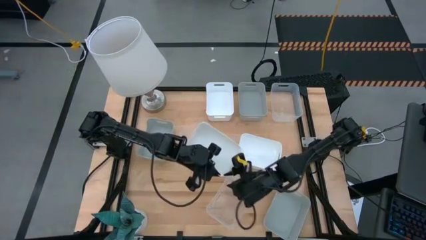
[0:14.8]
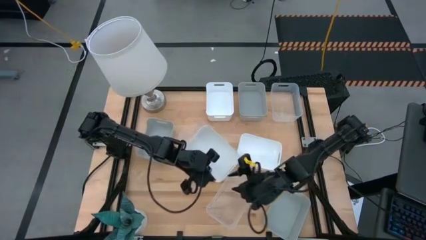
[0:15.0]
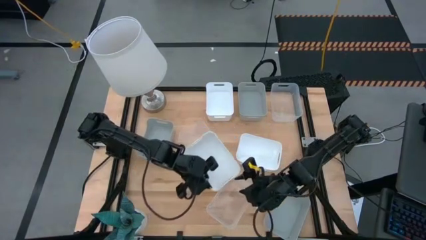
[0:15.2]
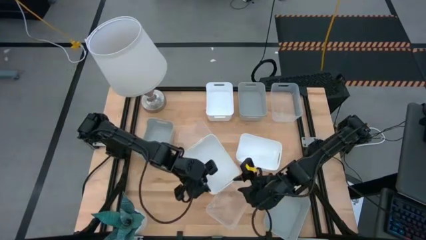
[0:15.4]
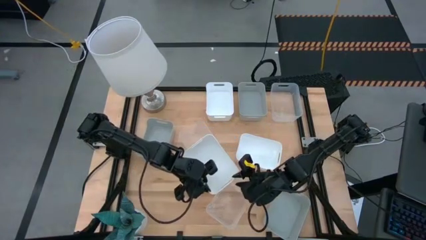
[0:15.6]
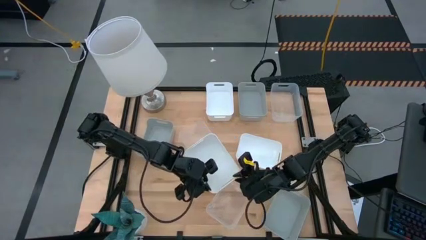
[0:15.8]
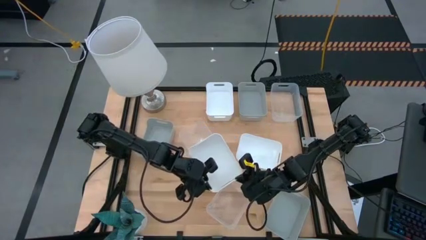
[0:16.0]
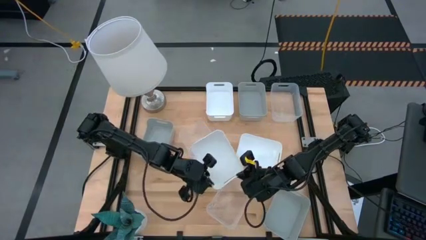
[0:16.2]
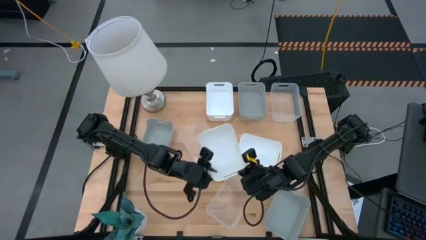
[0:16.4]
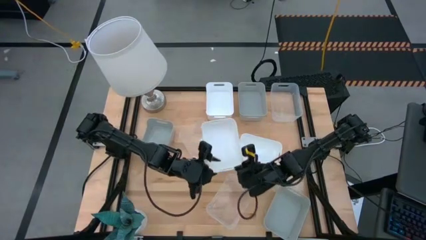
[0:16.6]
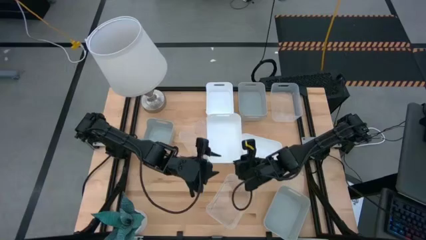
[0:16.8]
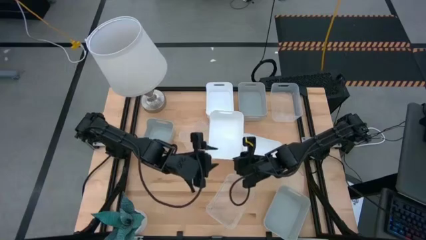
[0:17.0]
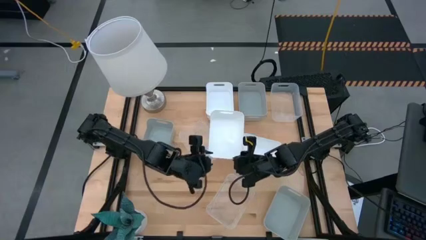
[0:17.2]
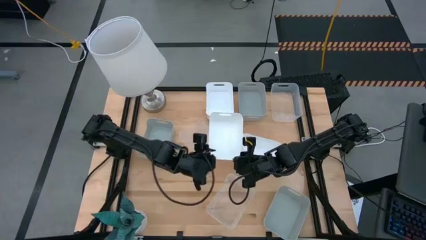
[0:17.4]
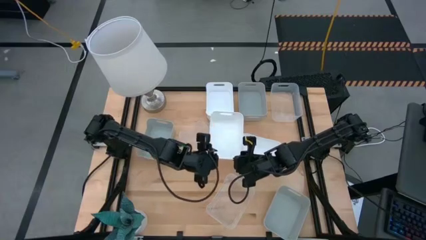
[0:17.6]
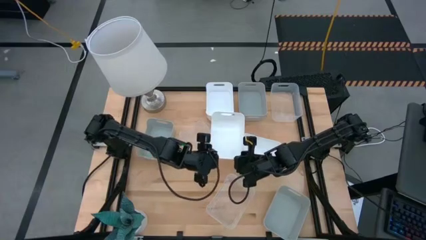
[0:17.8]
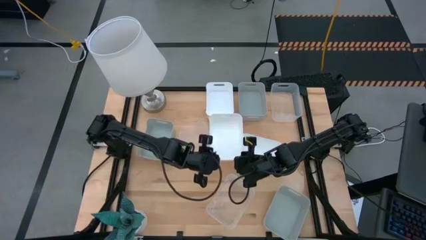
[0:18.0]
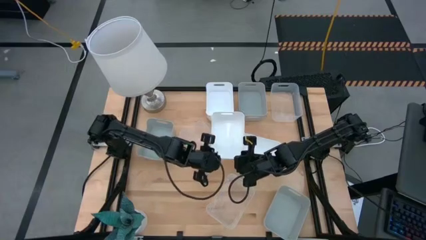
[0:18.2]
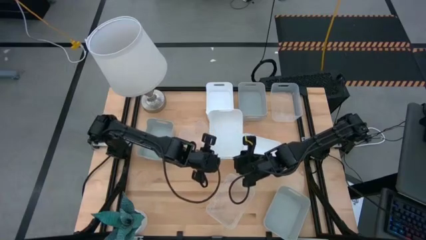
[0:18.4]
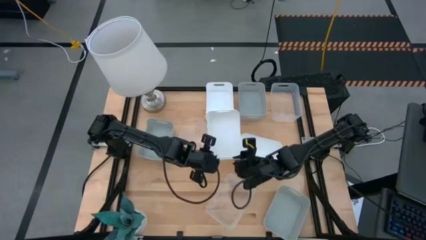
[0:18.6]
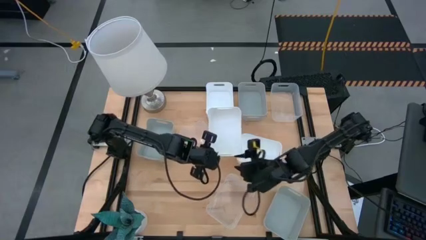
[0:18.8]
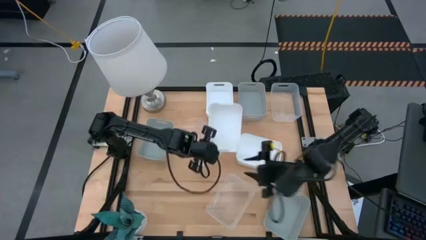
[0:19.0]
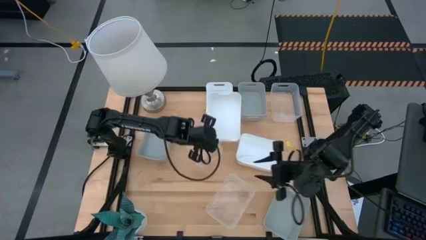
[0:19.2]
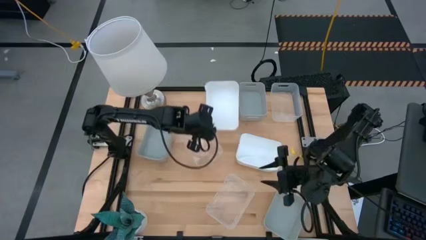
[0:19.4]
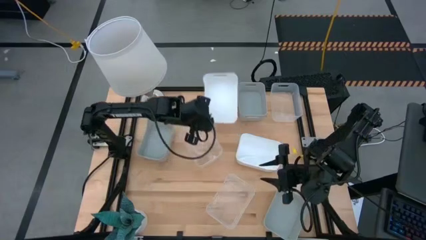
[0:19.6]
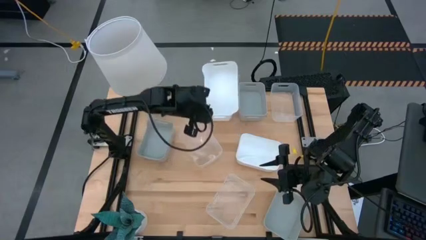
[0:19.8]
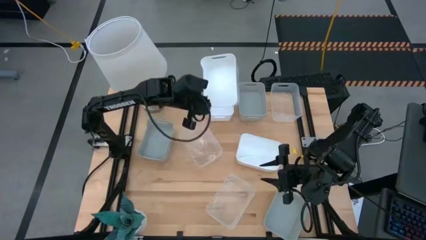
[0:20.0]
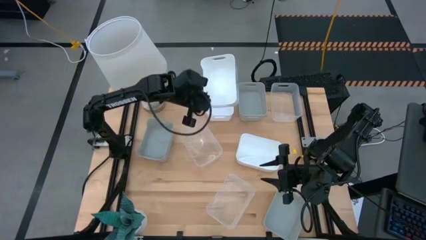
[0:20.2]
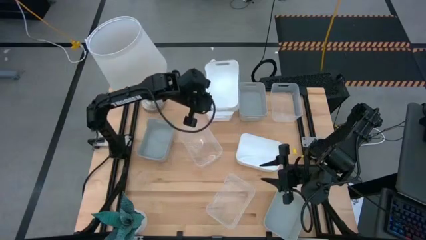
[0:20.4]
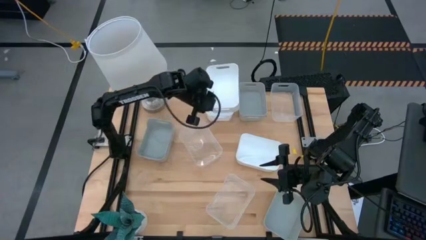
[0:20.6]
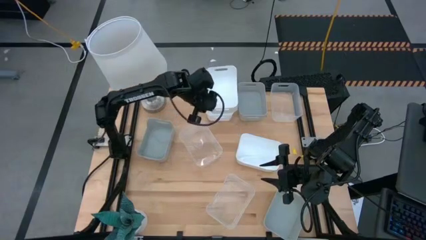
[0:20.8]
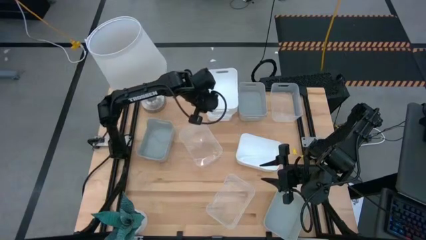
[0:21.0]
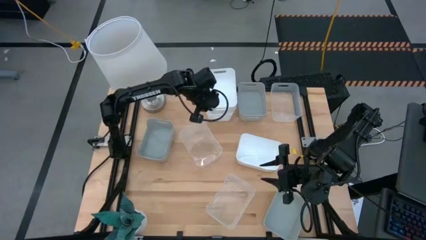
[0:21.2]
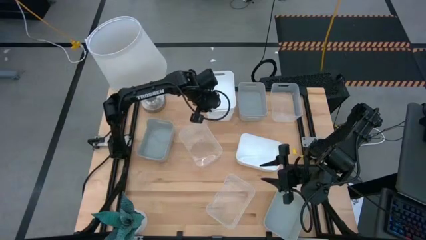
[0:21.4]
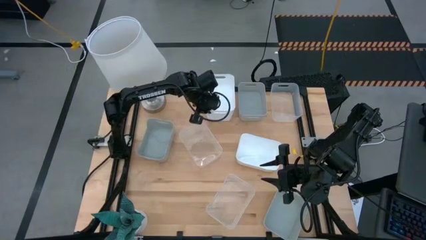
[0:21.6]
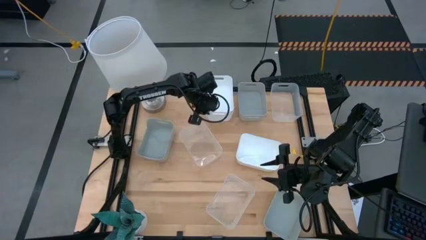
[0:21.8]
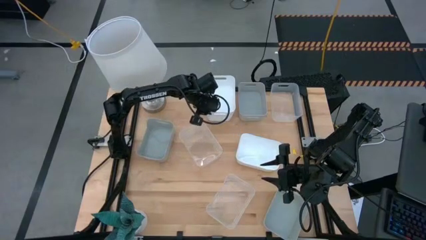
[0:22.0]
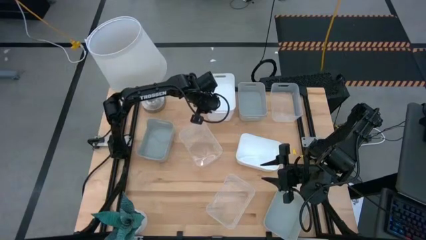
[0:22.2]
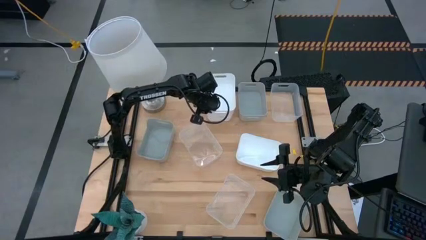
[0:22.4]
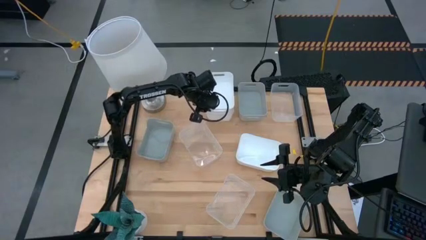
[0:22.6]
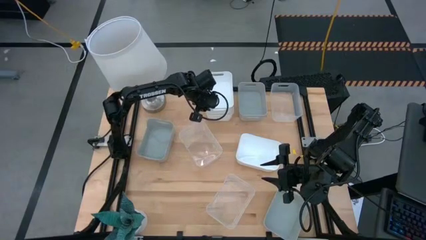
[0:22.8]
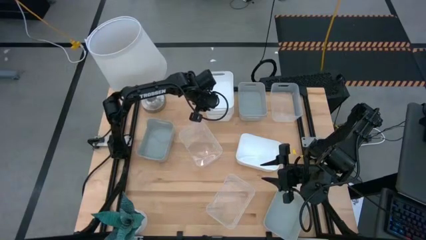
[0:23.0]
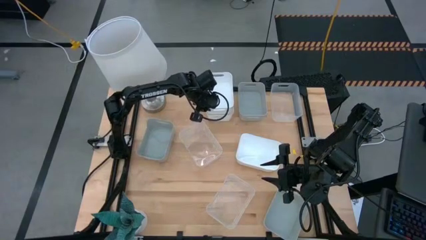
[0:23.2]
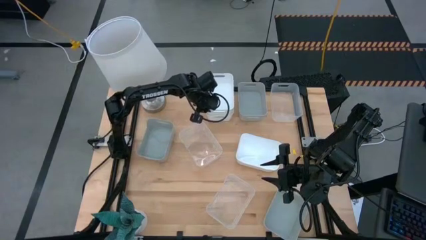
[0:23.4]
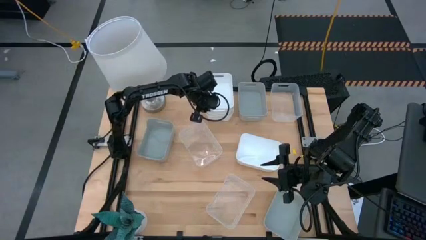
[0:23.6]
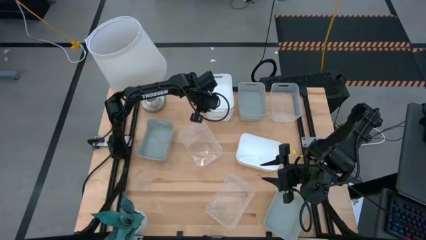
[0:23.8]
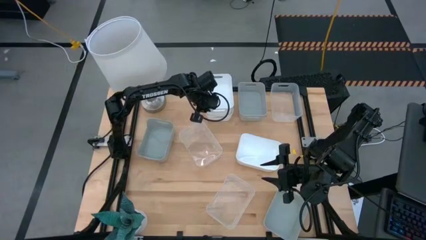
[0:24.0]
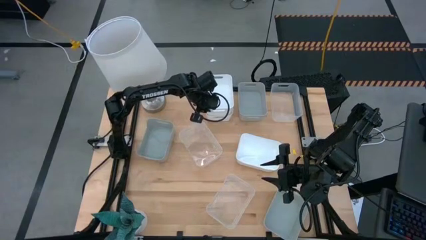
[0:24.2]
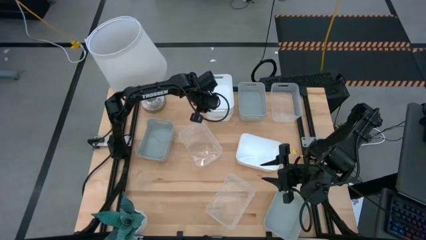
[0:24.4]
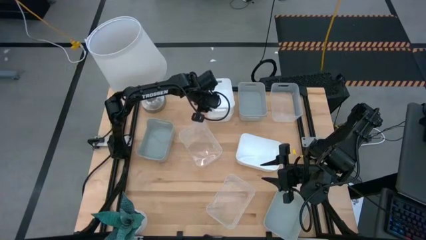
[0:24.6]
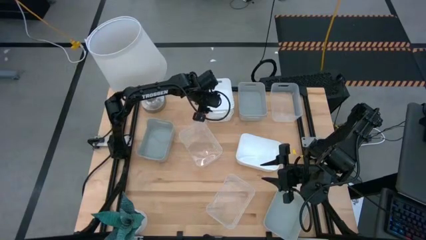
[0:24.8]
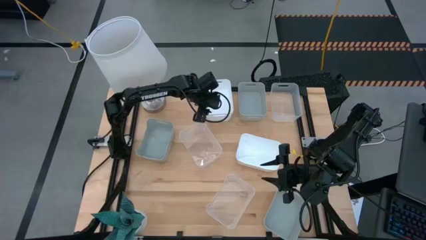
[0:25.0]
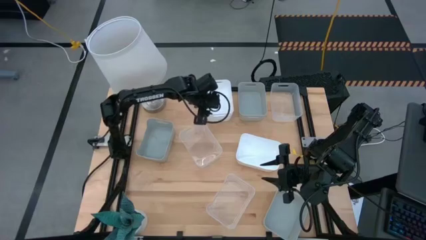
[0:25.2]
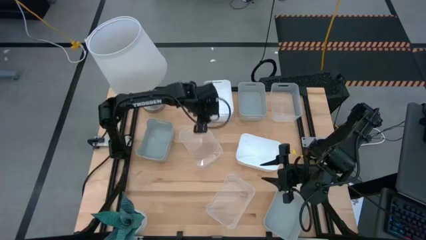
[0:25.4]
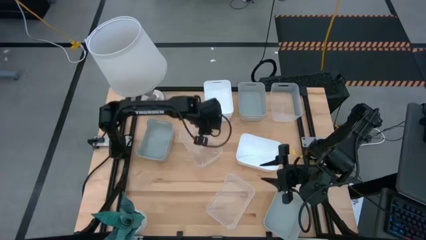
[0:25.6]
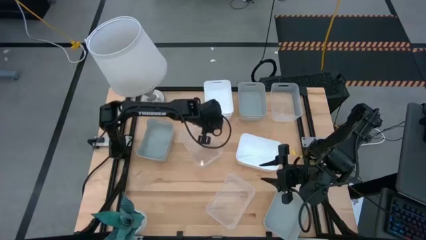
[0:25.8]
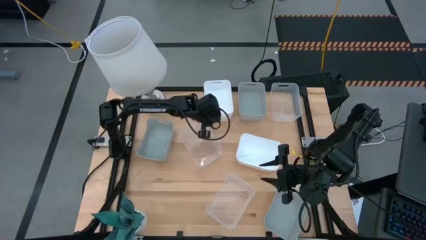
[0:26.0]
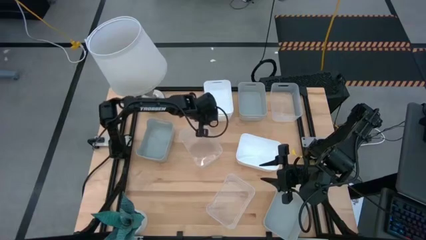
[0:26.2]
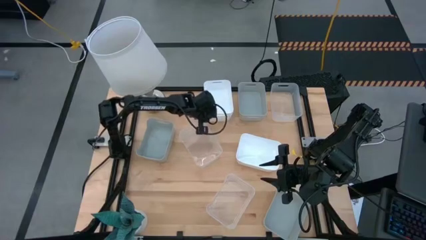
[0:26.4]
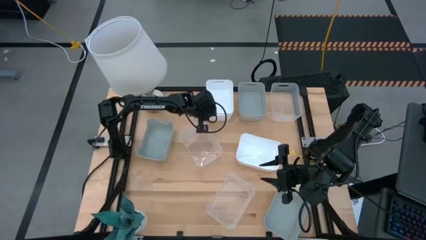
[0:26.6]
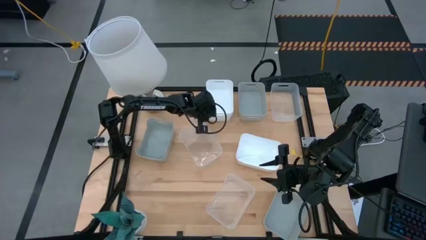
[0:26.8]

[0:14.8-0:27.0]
Stack the bottom white bin on top of the top white bin
